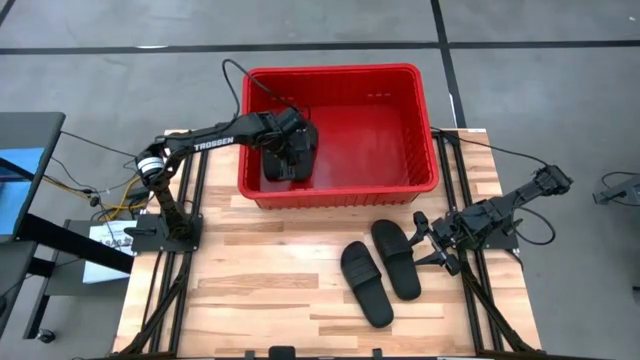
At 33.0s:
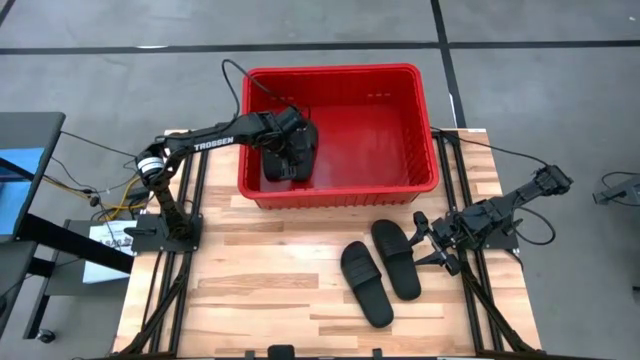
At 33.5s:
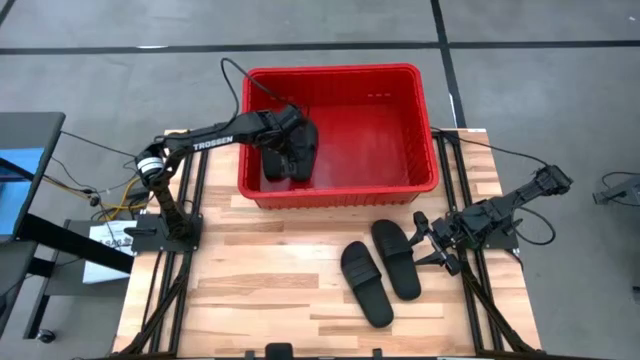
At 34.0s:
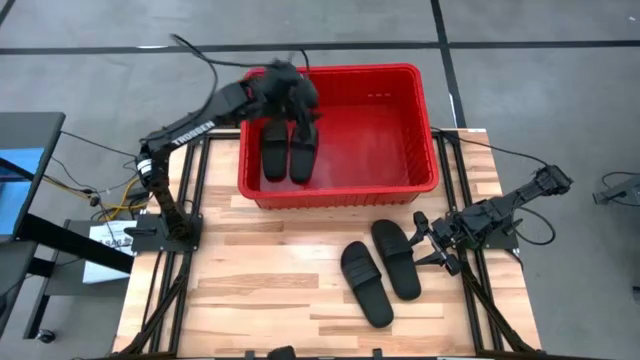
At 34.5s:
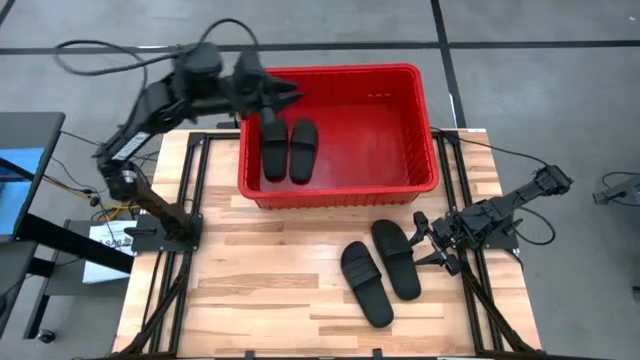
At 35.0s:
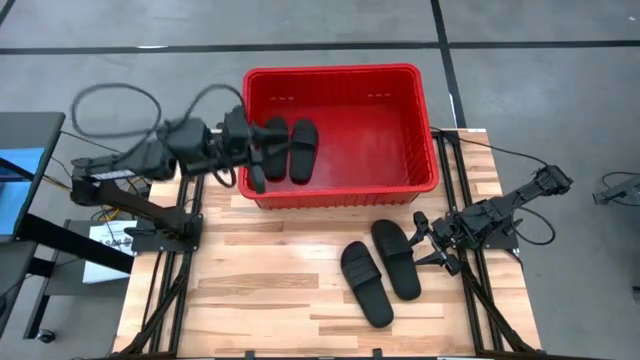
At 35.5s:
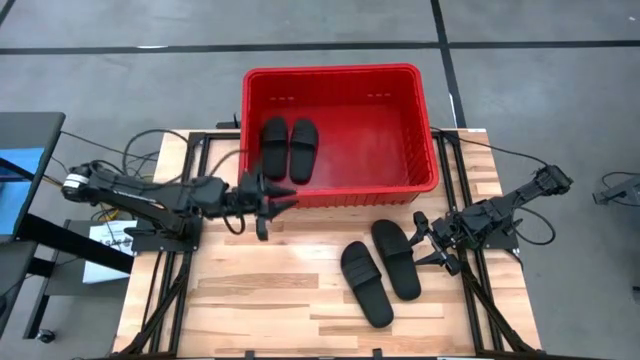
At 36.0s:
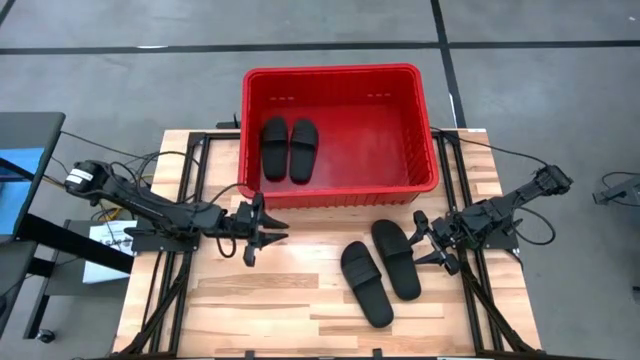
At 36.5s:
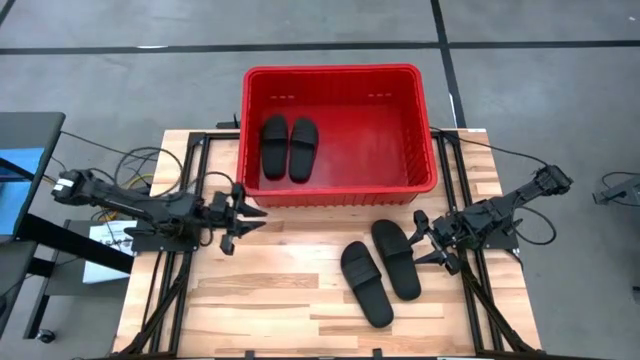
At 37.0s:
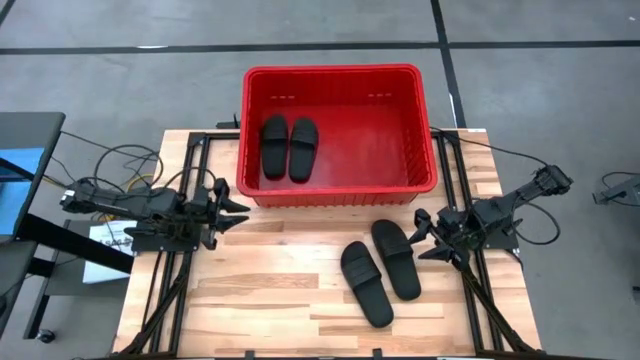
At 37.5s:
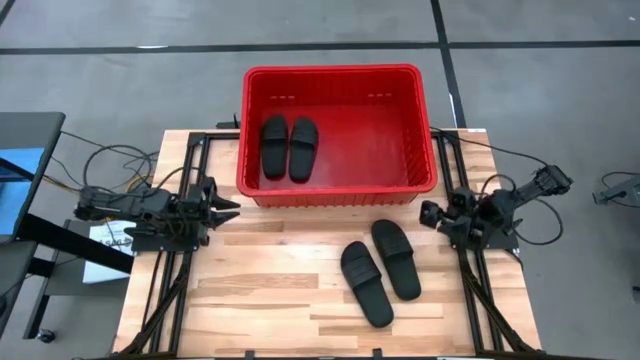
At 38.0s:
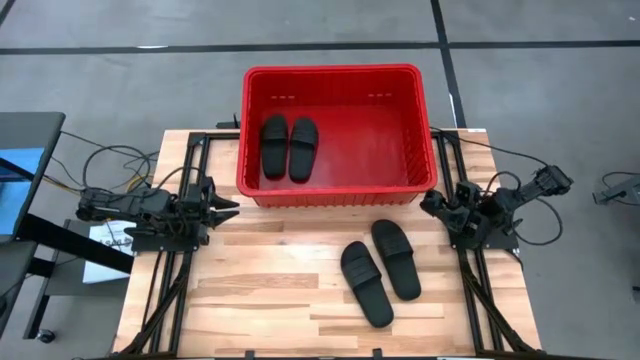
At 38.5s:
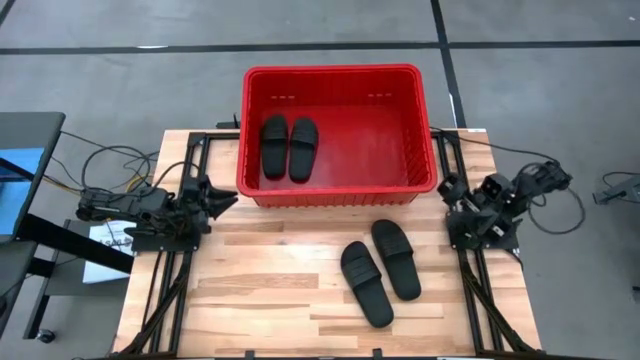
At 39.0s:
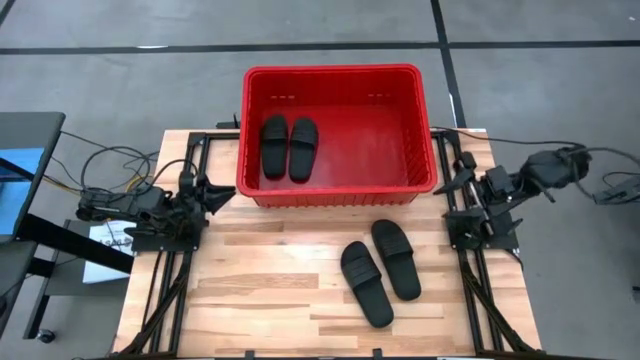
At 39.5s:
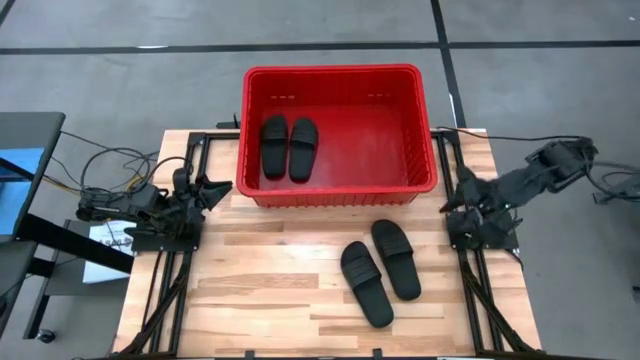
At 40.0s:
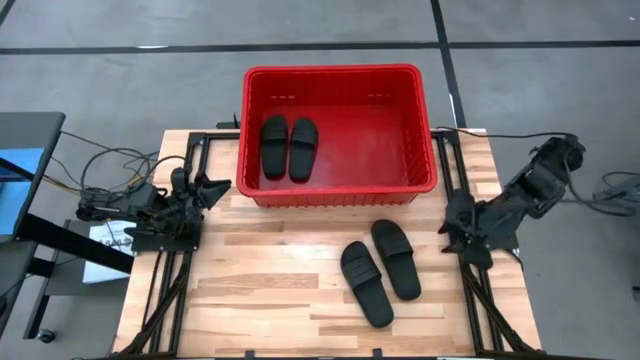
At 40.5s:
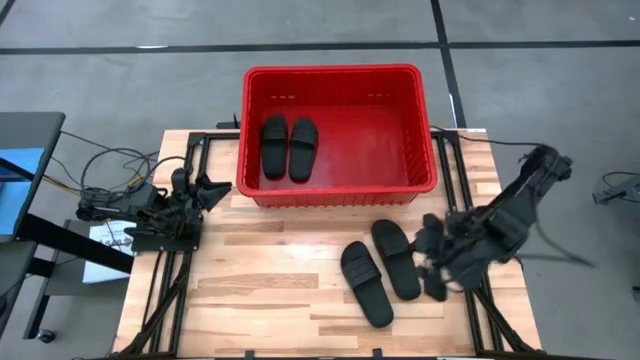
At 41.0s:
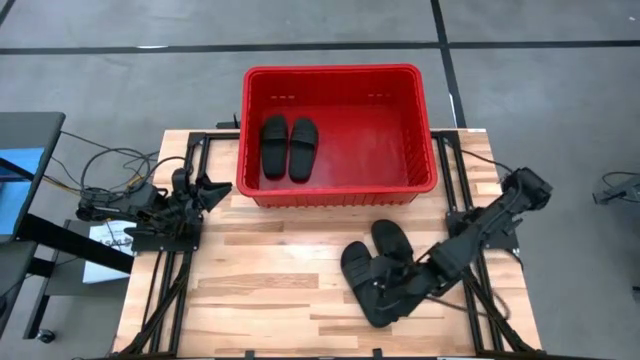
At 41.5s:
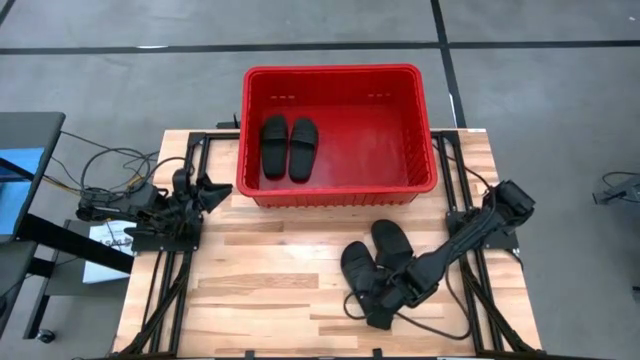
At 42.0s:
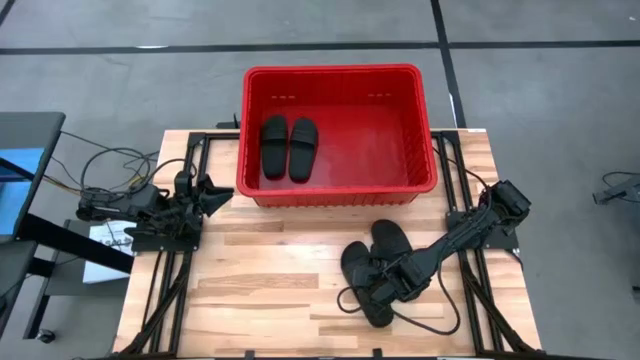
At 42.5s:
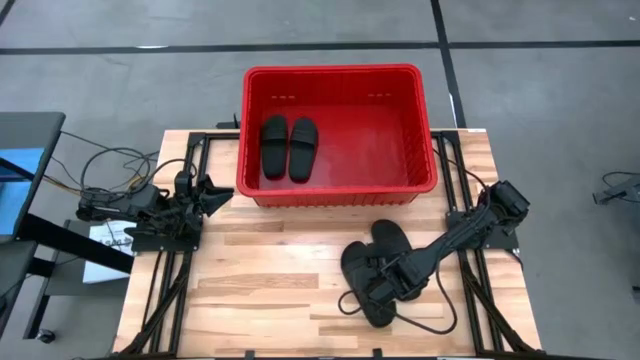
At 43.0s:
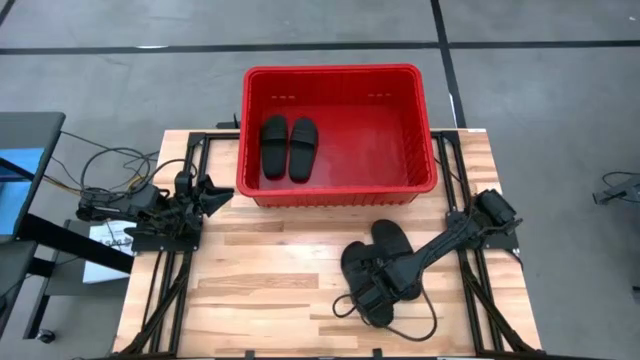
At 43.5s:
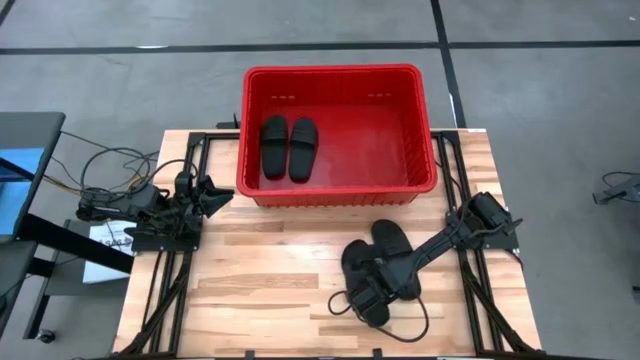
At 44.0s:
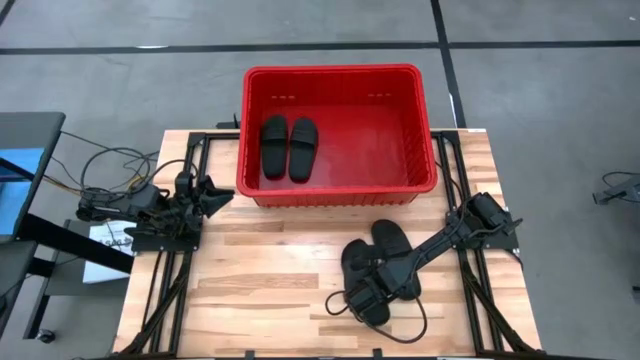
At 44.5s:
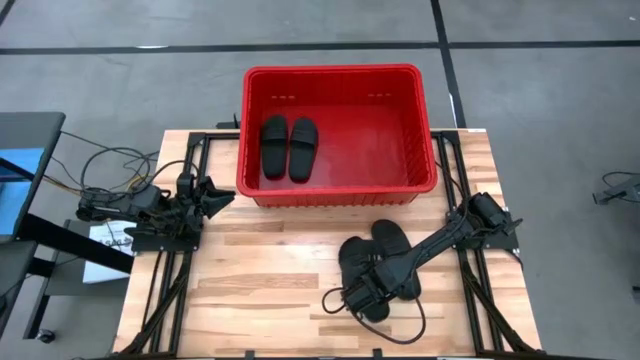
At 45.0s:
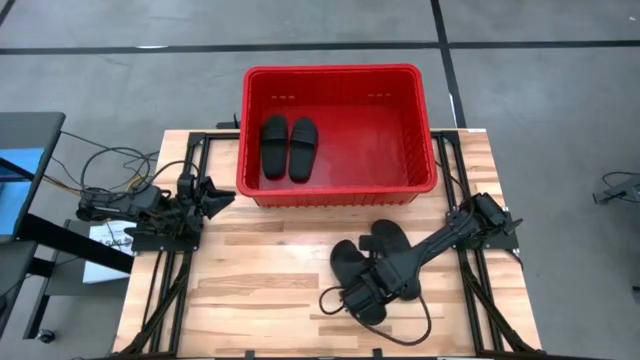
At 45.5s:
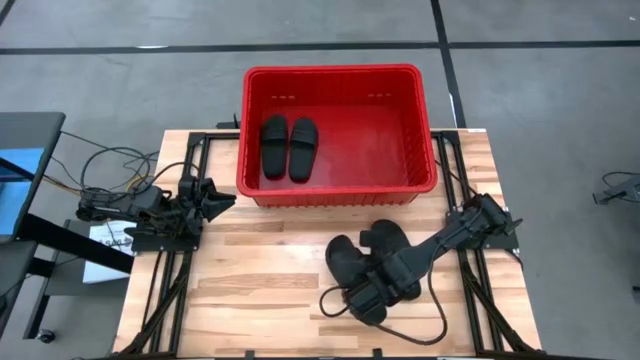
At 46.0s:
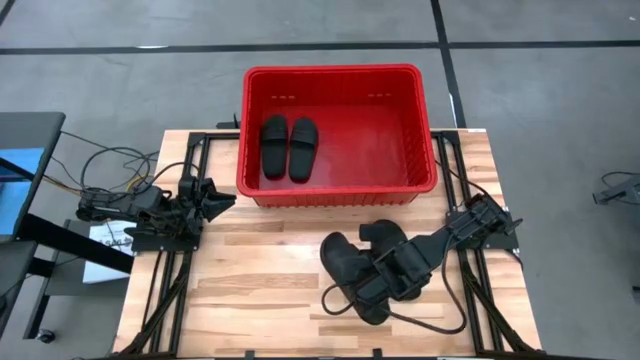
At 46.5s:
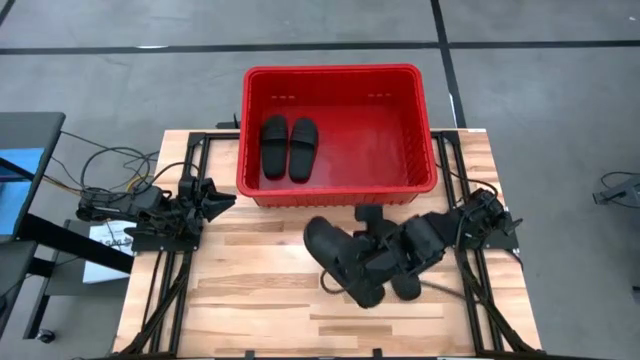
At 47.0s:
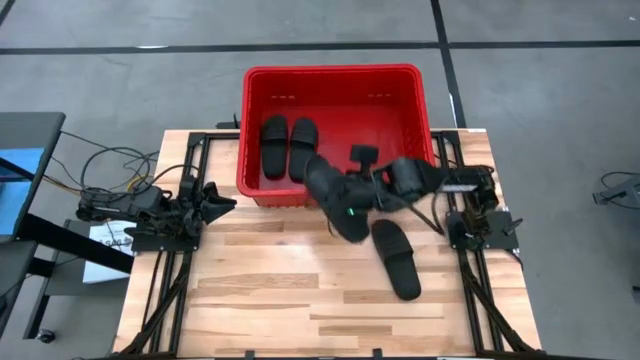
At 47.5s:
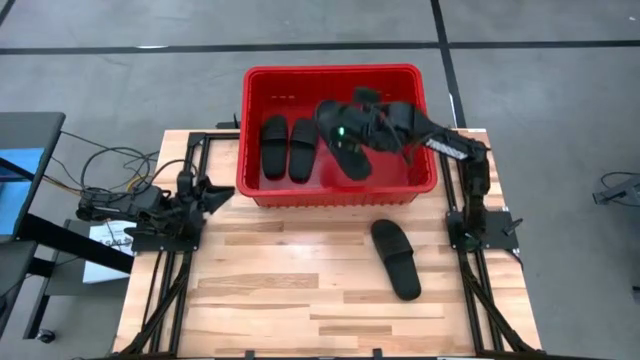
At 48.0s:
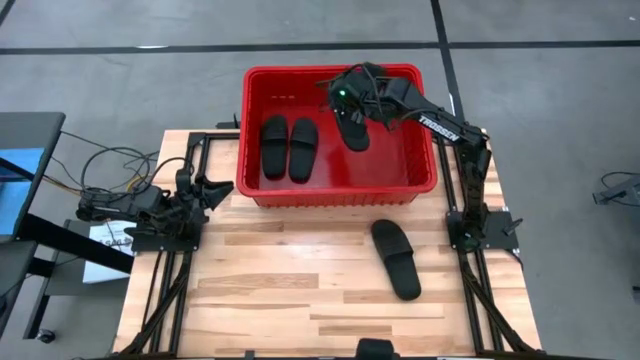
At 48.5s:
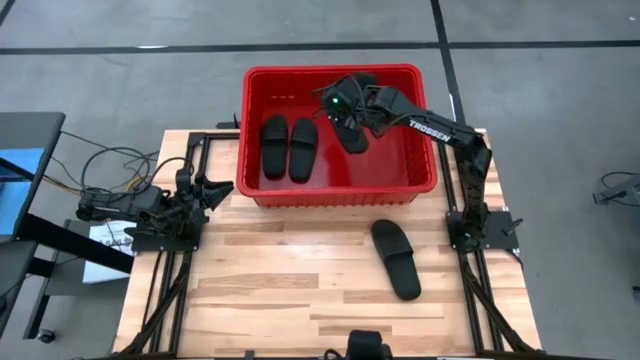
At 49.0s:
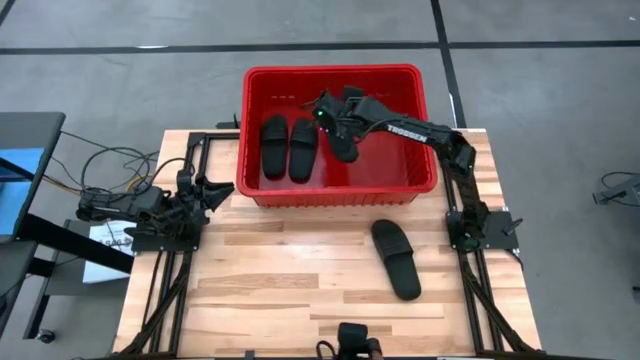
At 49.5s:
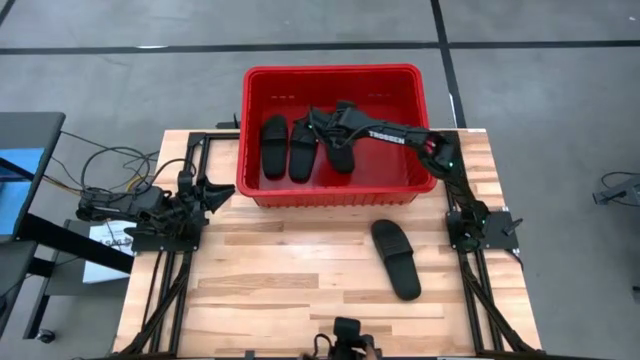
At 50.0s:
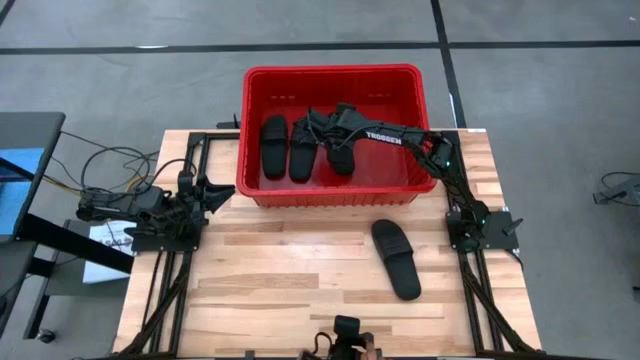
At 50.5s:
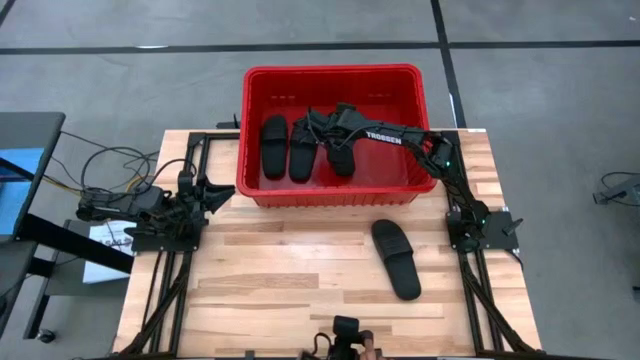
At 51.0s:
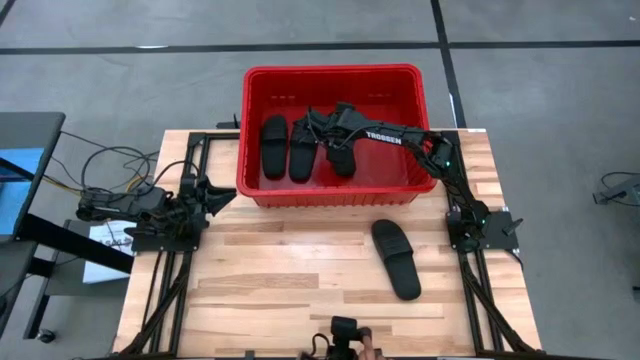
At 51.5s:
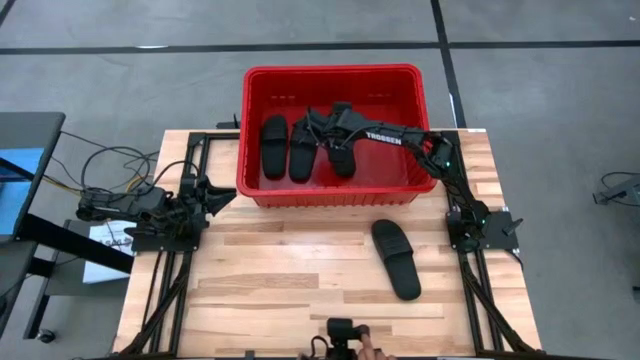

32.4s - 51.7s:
Task: Pick and place slides into bin
Put the black slipper into the red bin
